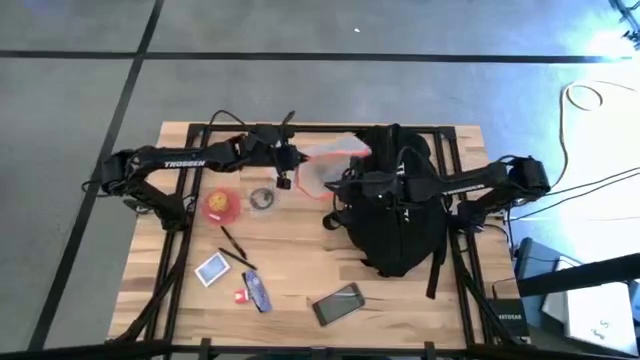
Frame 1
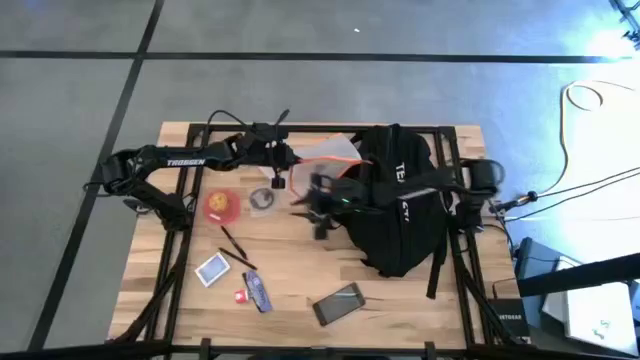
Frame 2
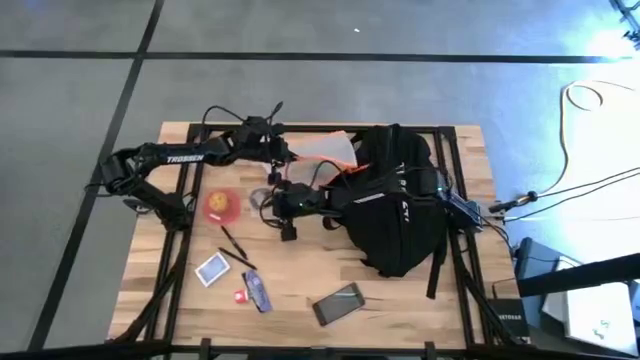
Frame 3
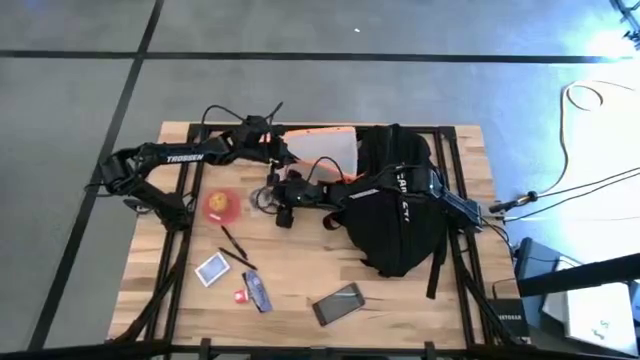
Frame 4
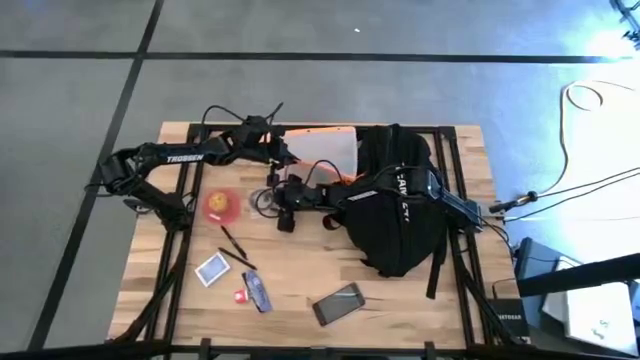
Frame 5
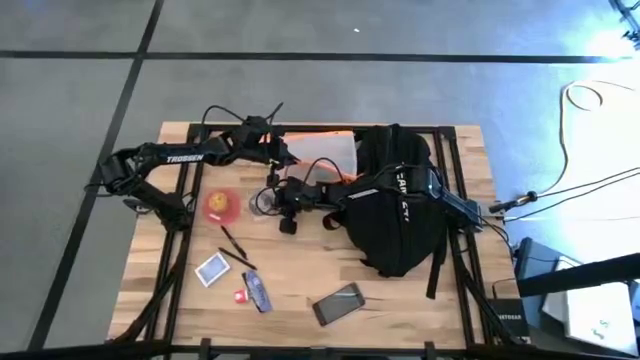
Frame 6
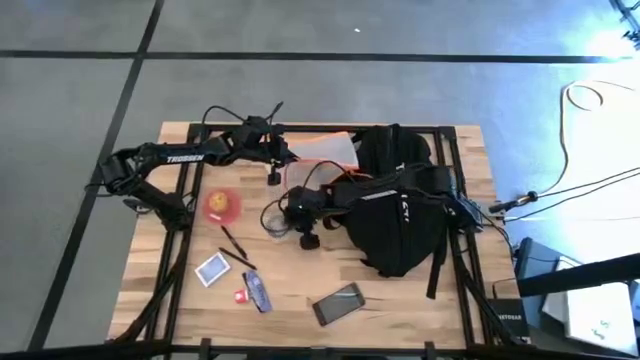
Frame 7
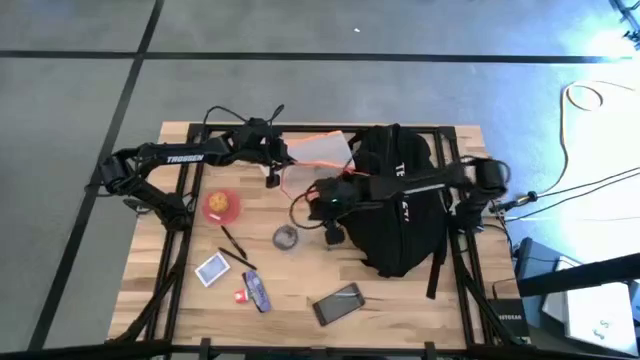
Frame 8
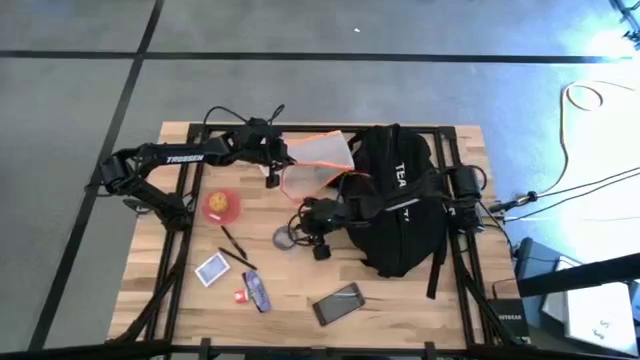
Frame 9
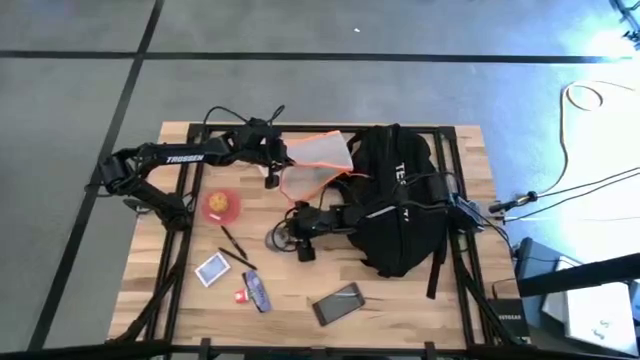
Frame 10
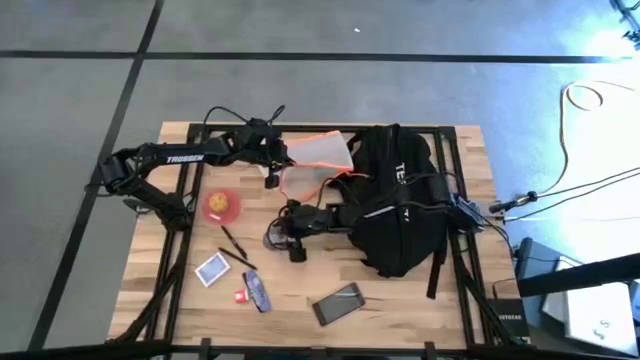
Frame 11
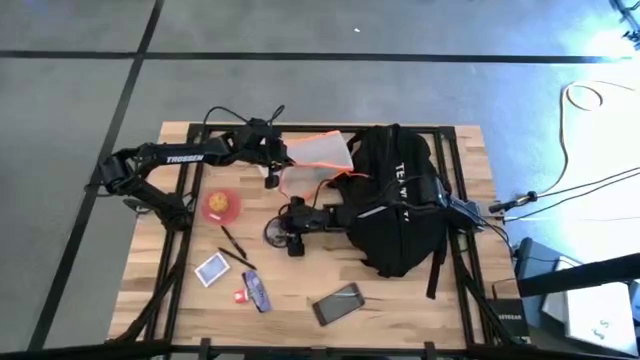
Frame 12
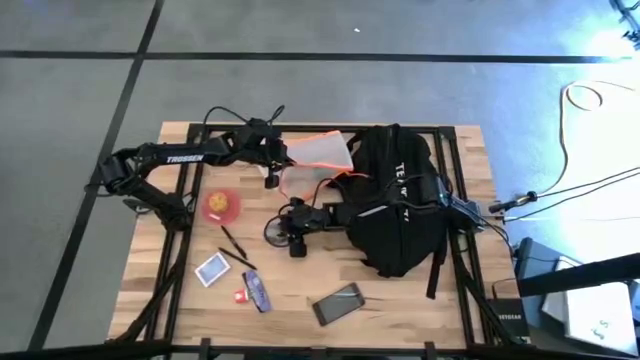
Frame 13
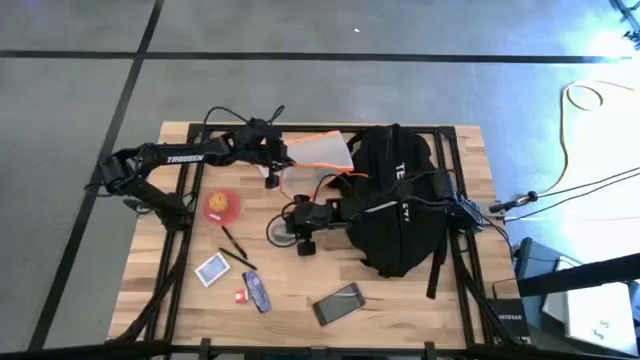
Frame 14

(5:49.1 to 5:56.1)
Task: Unpack backpack
Put the black earphones into the transparent white zip bag

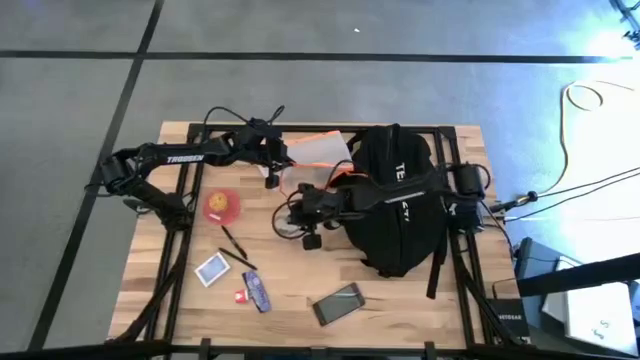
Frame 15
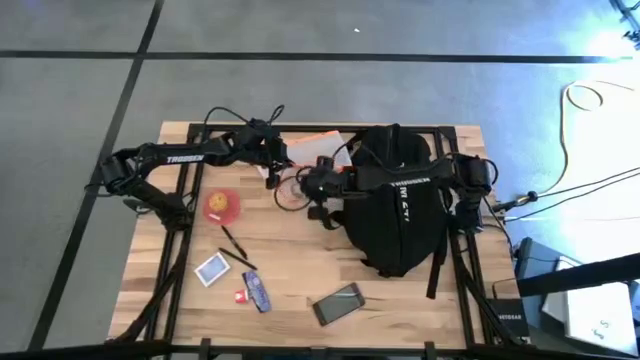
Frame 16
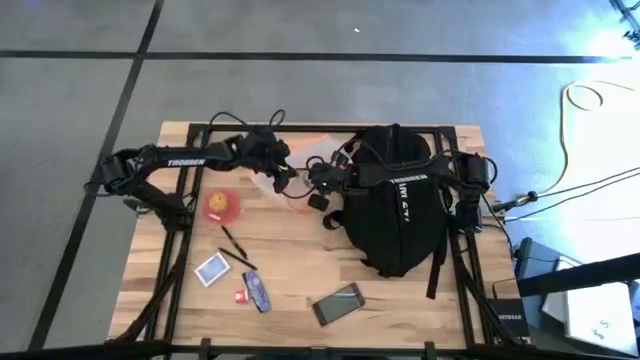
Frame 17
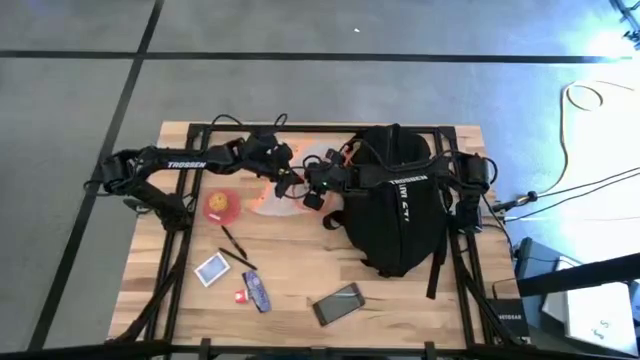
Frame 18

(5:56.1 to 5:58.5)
Put the black earphones into the transparent white zip bag

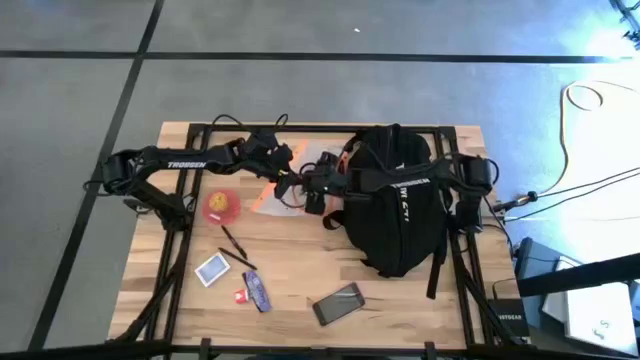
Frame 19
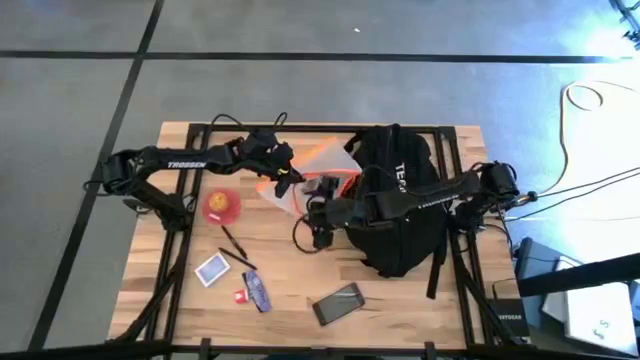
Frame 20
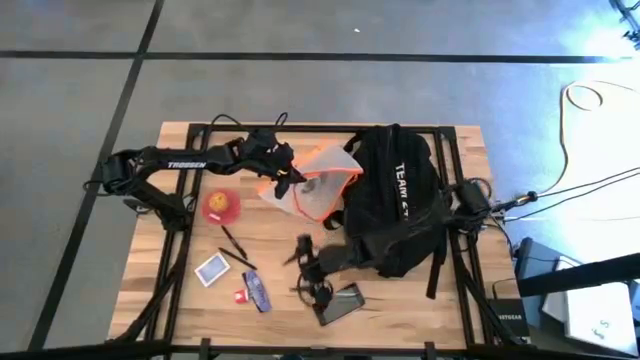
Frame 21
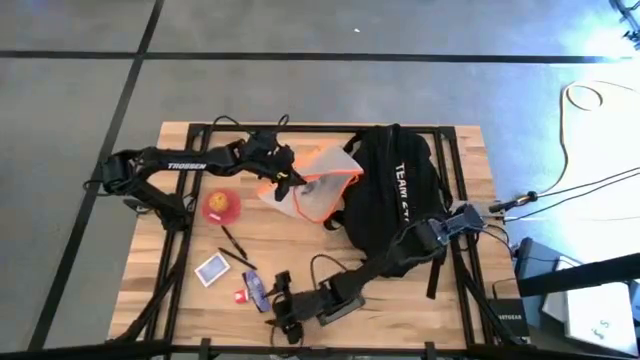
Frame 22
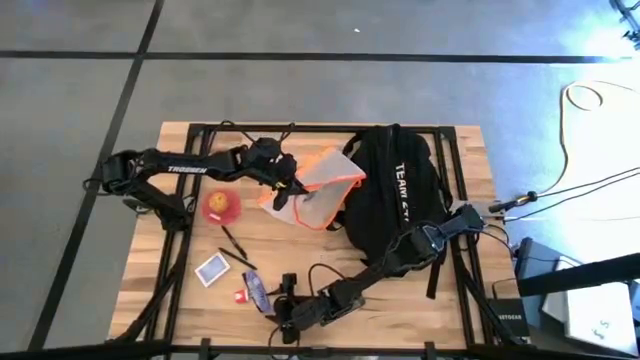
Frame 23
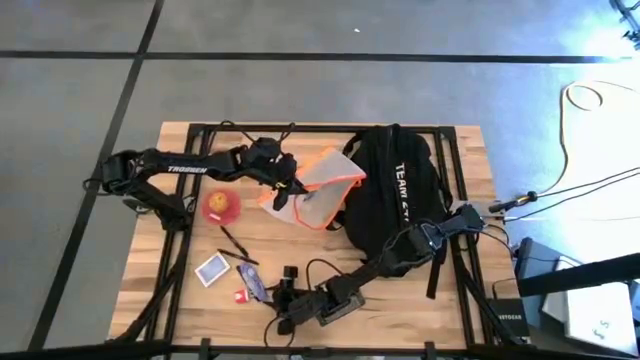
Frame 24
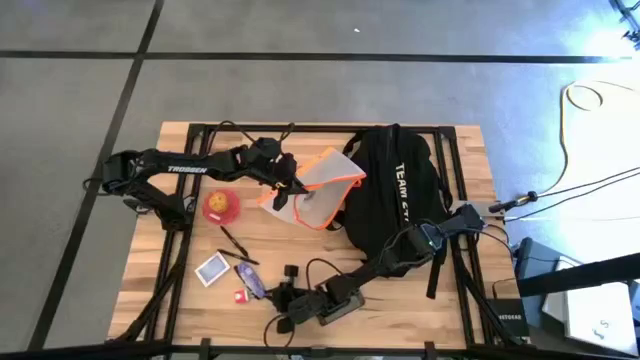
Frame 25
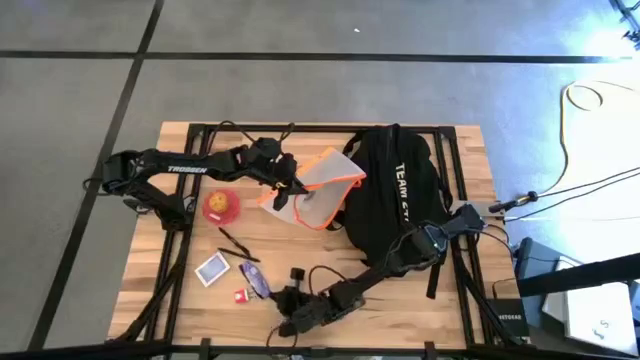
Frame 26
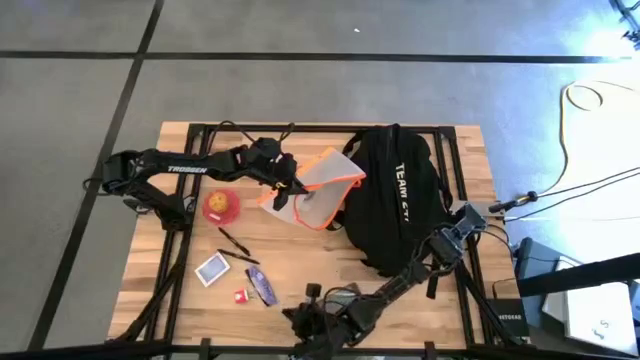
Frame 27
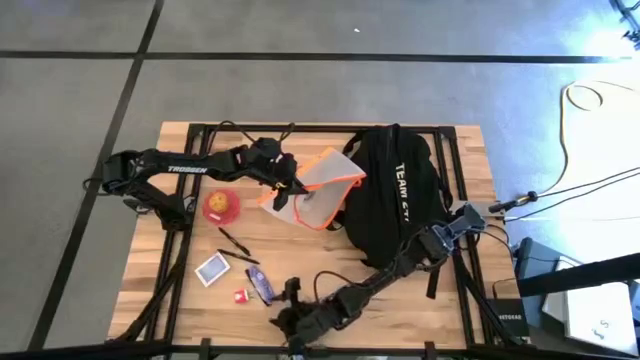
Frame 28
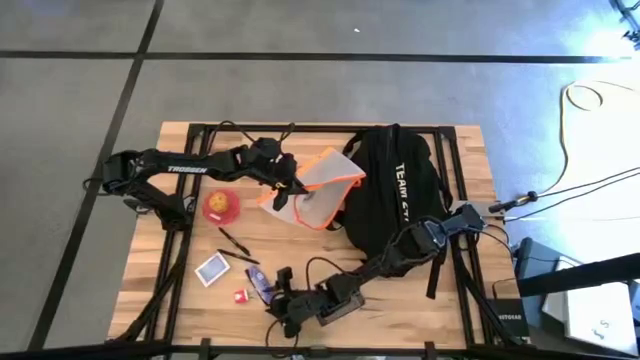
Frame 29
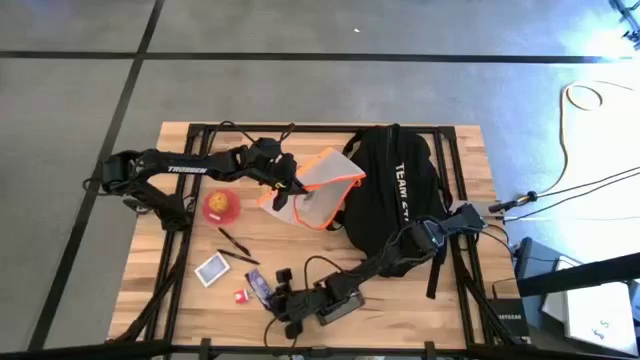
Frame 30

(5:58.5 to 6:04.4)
Put the blue chocolate bar into the transparent white zip bag

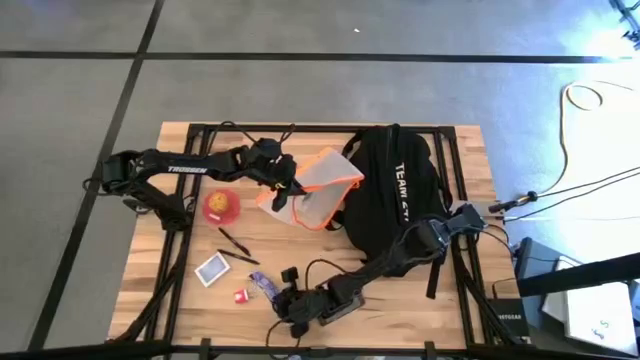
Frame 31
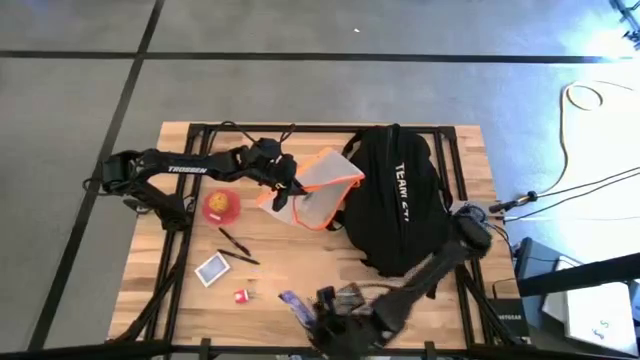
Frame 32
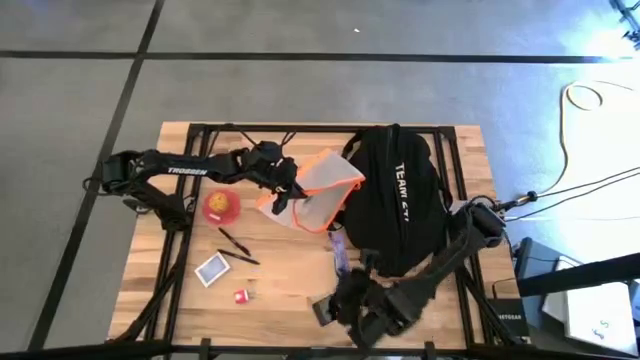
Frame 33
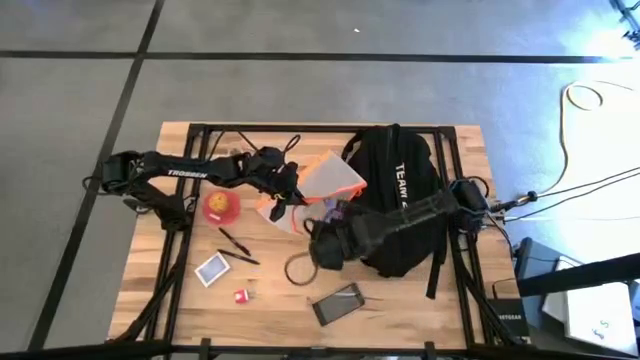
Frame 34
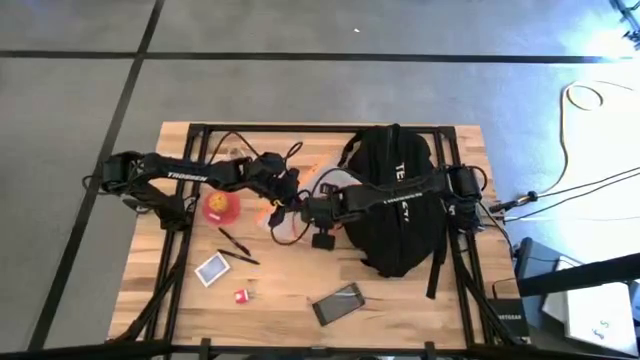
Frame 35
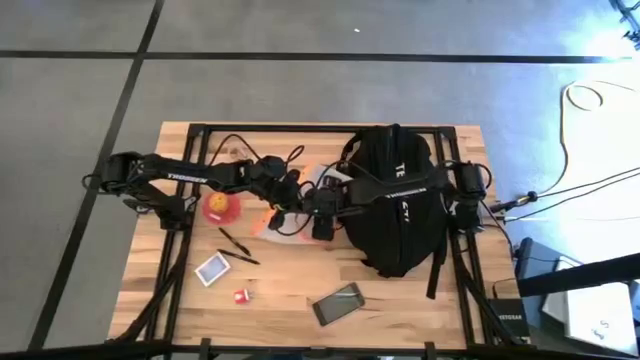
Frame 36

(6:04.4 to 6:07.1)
Put the blue chocolate bar into the transparent white zip bag

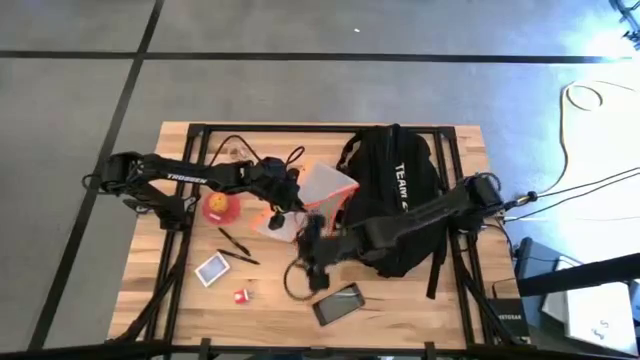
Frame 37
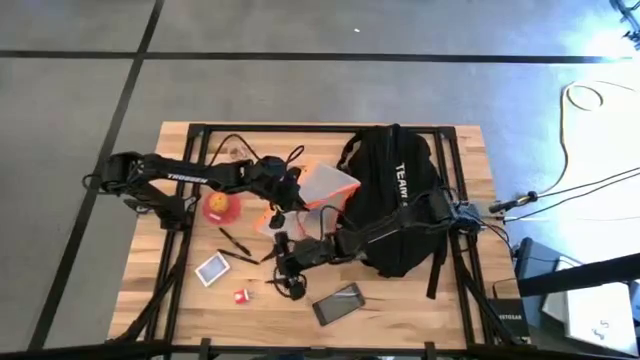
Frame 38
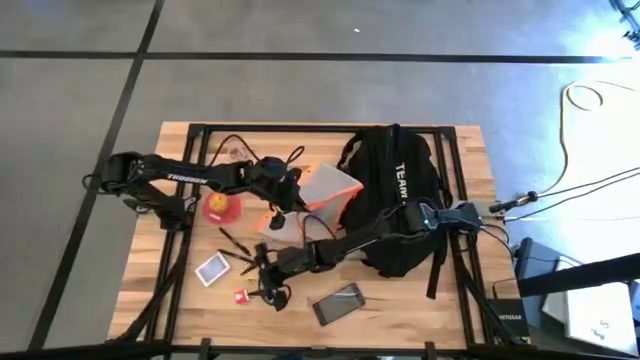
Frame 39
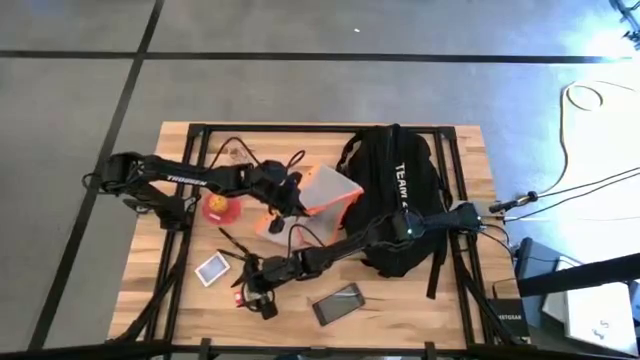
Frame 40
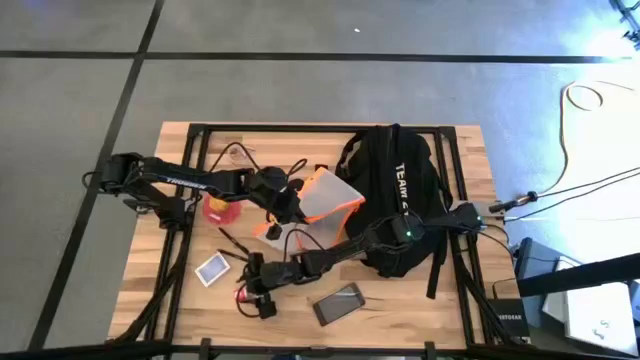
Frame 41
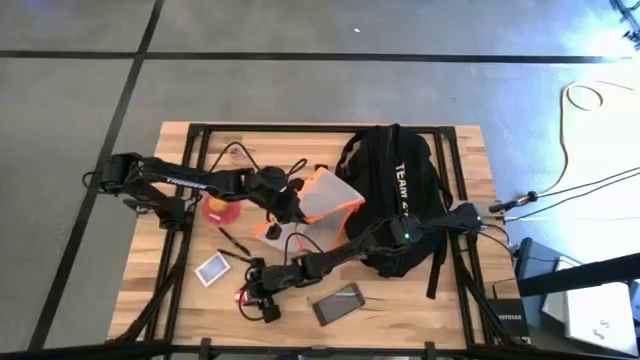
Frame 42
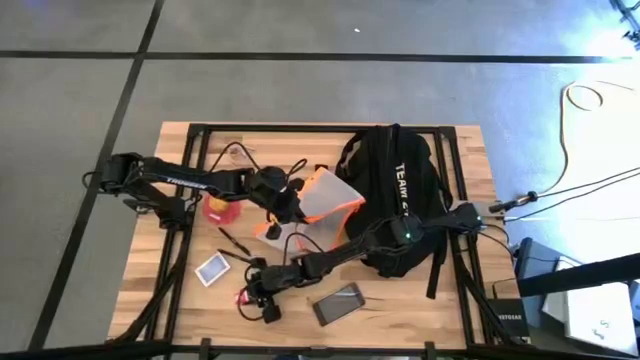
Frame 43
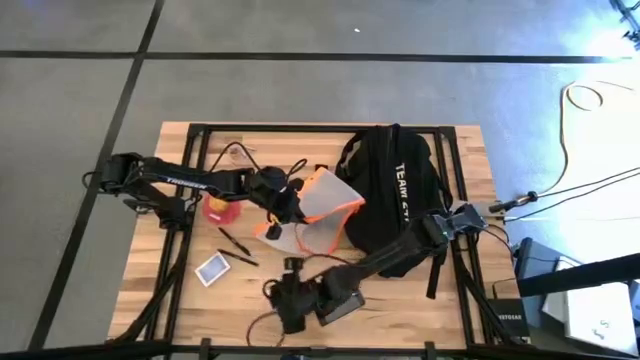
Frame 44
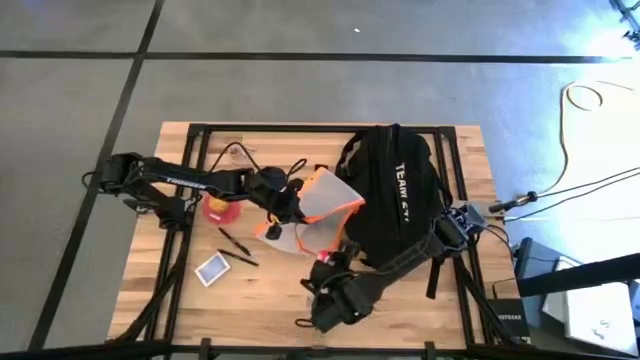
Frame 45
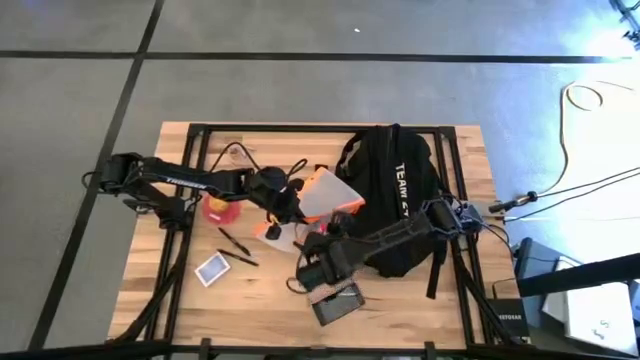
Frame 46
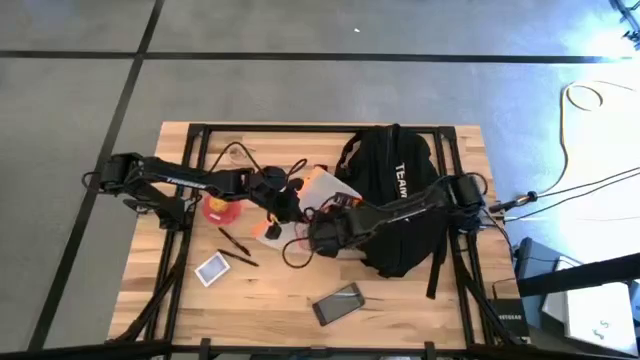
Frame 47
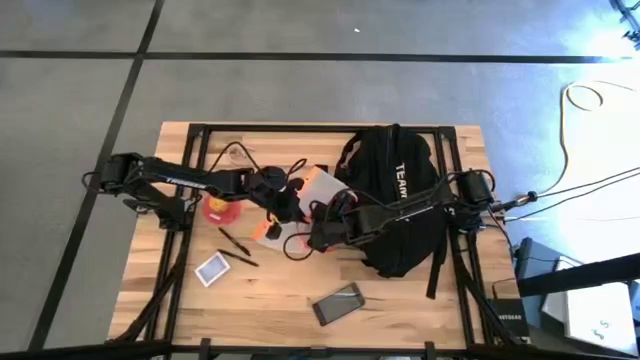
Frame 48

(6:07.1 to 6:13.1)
Put the red charger adapter into the transparent white zip bag
